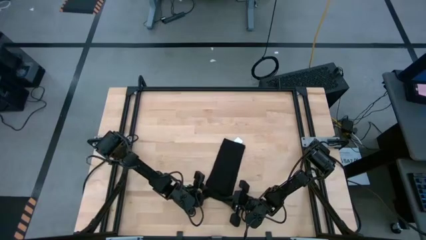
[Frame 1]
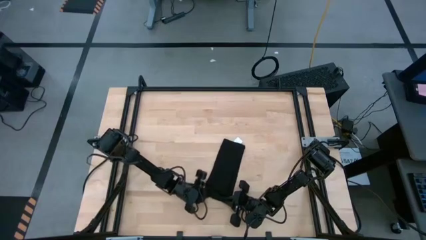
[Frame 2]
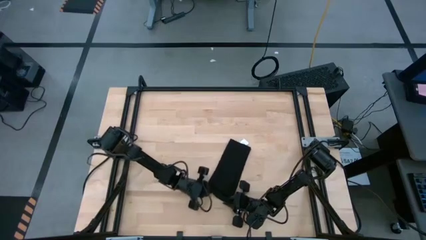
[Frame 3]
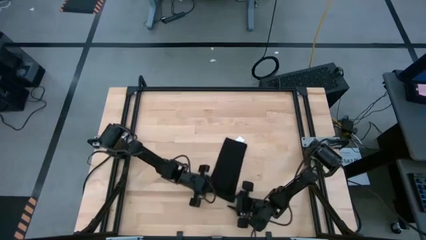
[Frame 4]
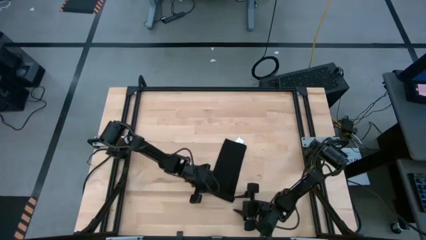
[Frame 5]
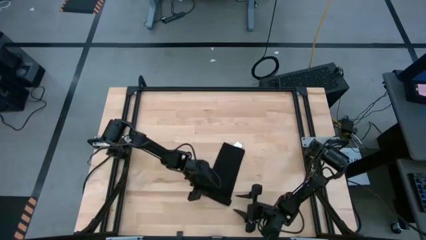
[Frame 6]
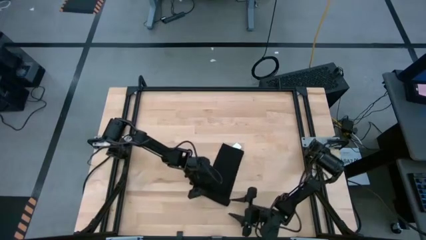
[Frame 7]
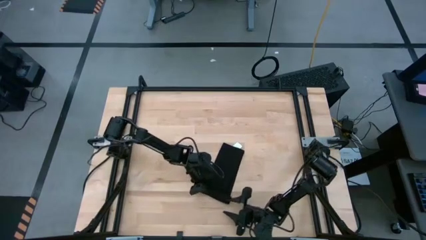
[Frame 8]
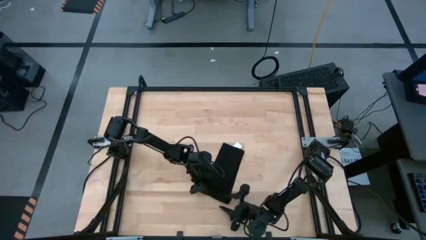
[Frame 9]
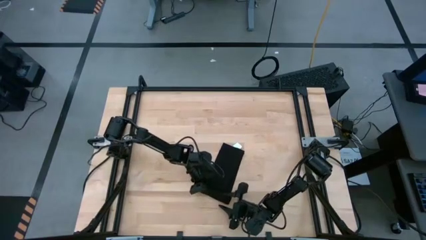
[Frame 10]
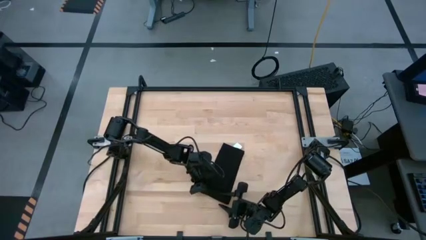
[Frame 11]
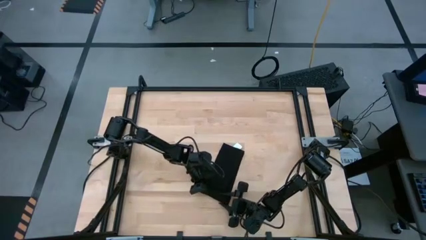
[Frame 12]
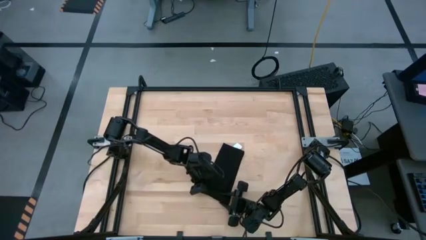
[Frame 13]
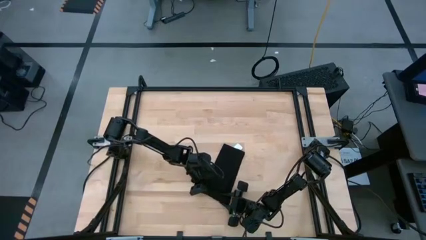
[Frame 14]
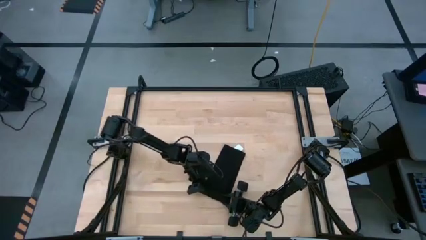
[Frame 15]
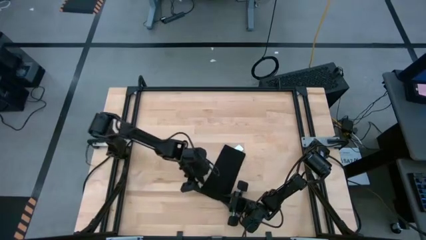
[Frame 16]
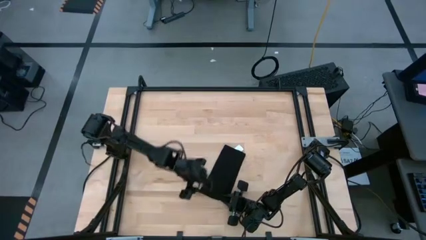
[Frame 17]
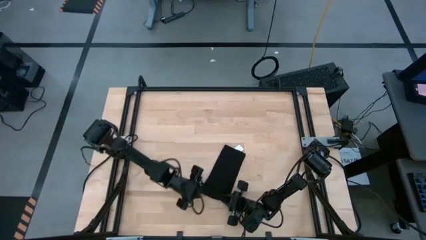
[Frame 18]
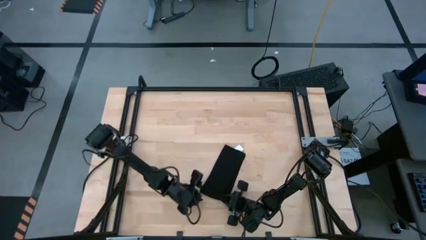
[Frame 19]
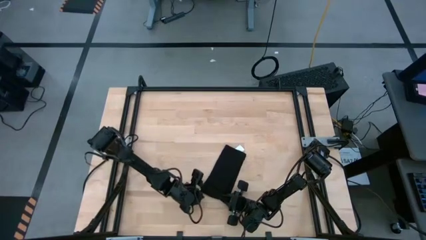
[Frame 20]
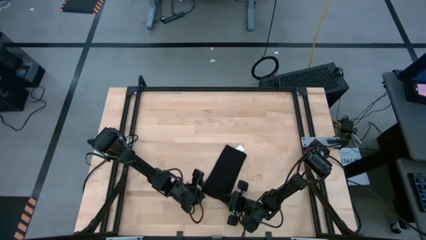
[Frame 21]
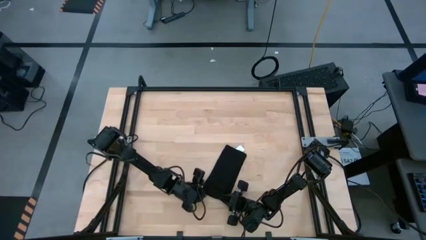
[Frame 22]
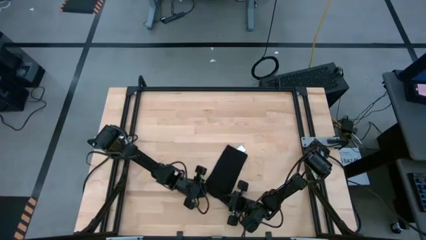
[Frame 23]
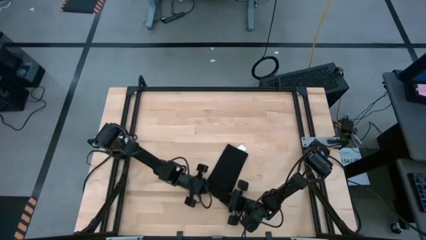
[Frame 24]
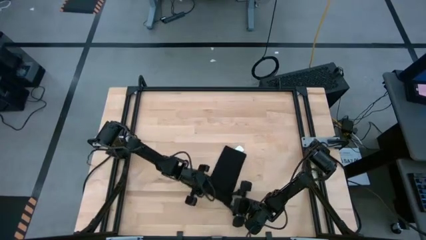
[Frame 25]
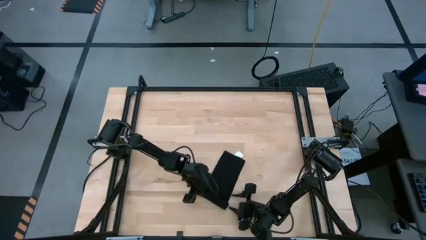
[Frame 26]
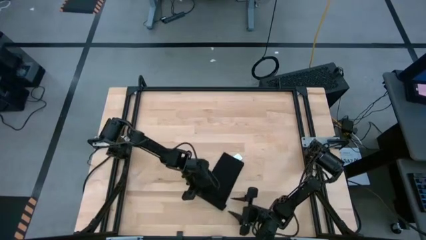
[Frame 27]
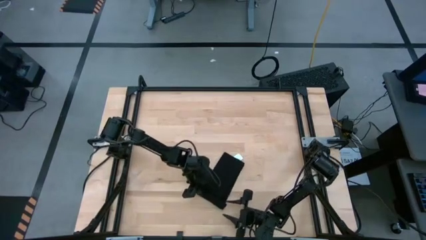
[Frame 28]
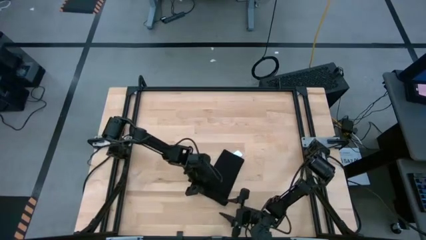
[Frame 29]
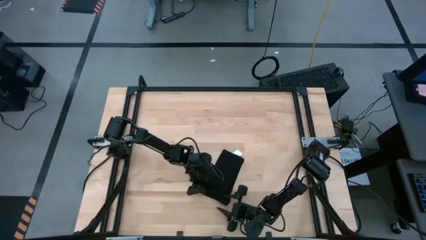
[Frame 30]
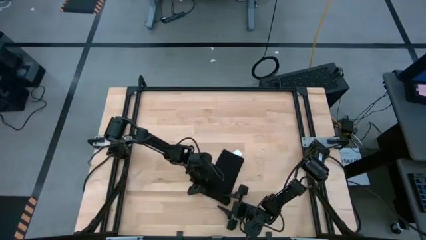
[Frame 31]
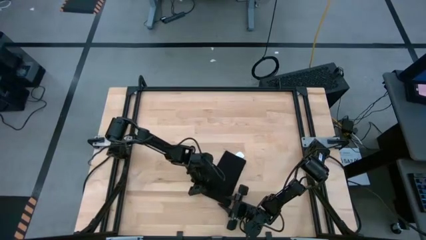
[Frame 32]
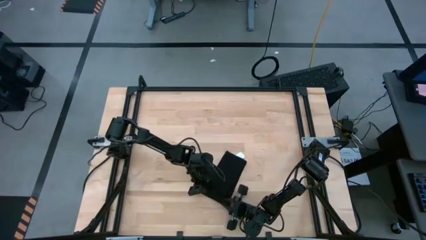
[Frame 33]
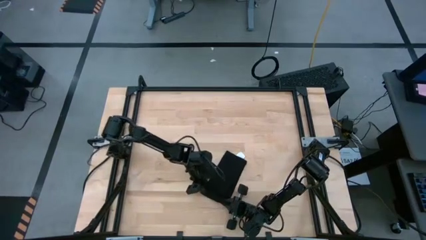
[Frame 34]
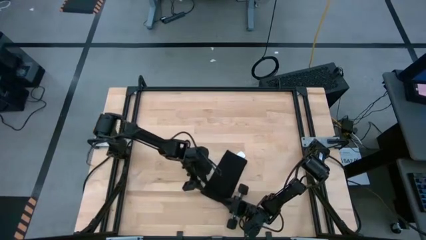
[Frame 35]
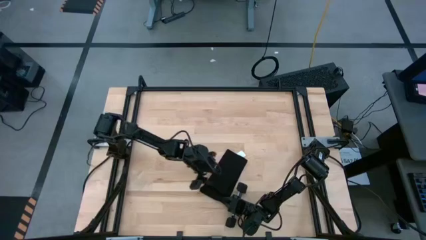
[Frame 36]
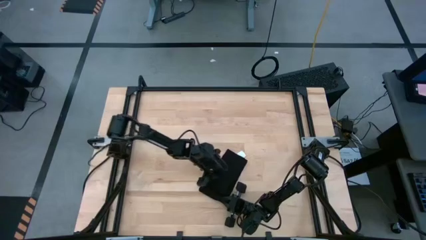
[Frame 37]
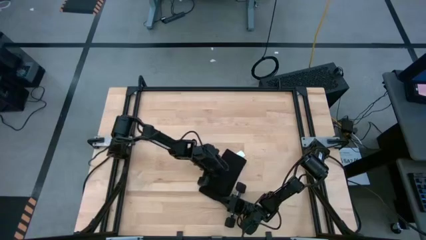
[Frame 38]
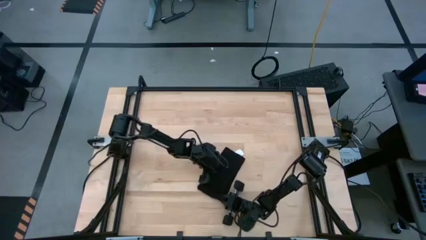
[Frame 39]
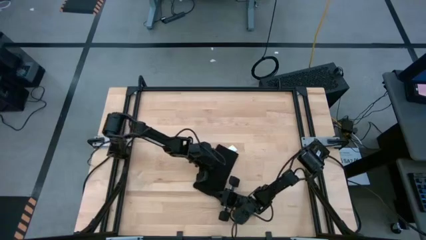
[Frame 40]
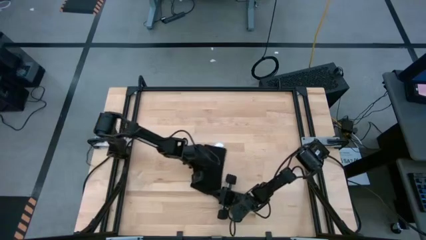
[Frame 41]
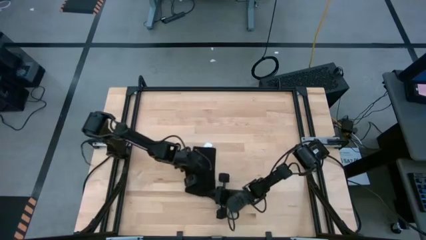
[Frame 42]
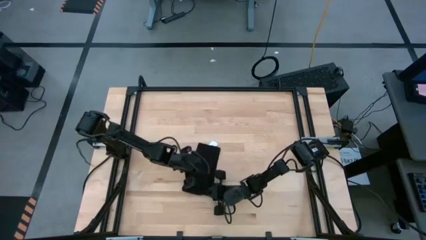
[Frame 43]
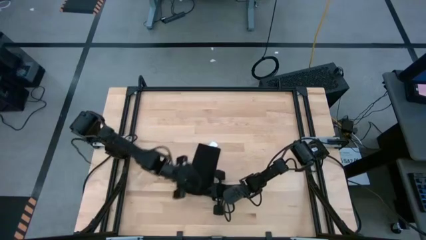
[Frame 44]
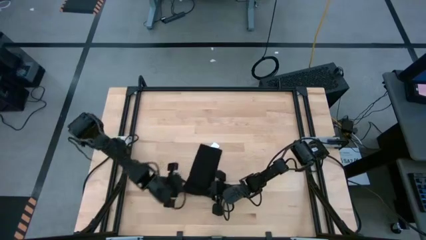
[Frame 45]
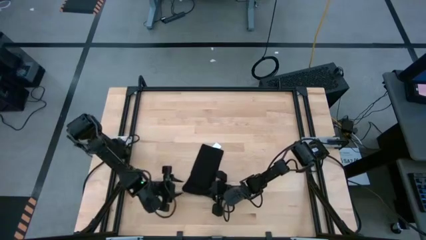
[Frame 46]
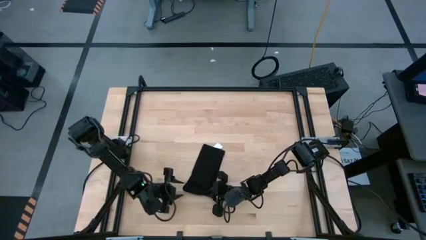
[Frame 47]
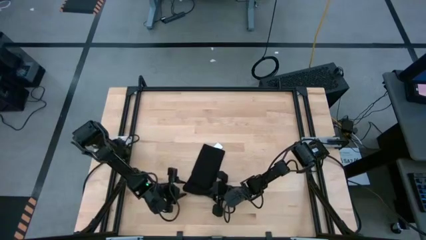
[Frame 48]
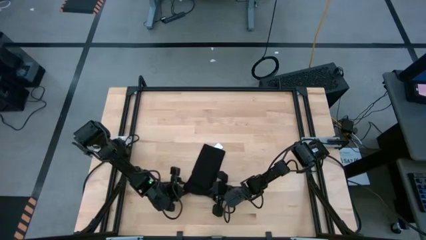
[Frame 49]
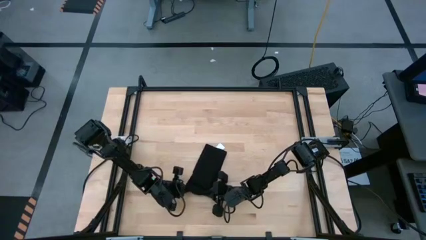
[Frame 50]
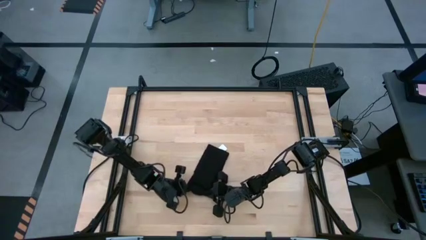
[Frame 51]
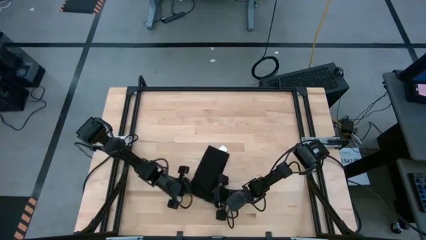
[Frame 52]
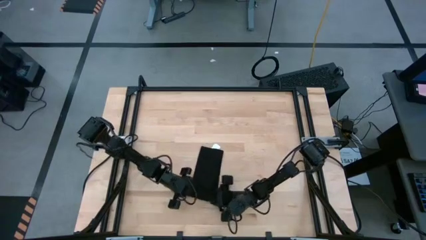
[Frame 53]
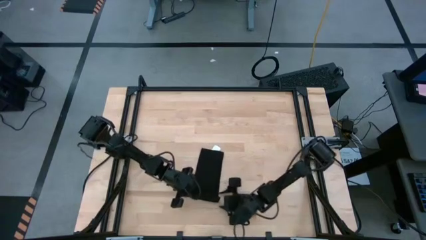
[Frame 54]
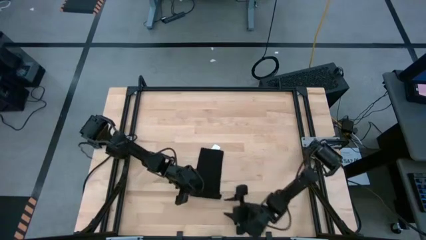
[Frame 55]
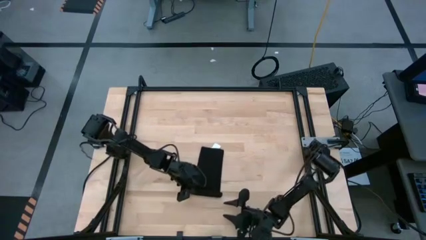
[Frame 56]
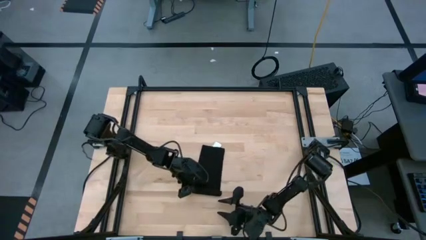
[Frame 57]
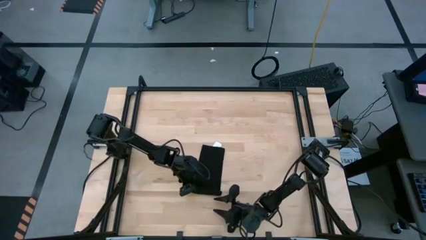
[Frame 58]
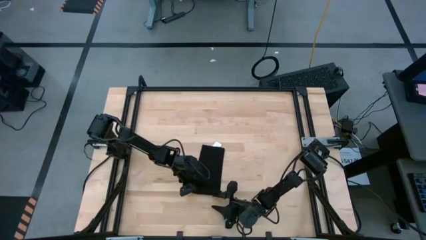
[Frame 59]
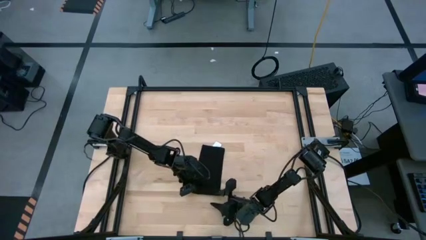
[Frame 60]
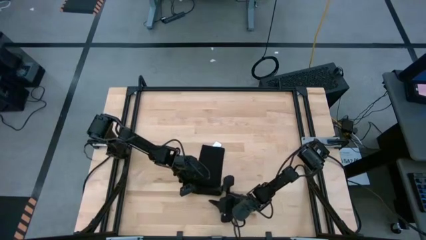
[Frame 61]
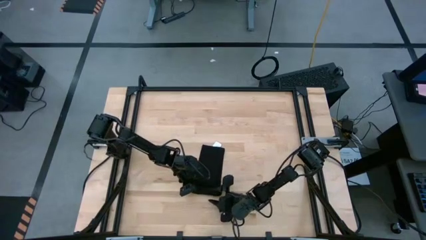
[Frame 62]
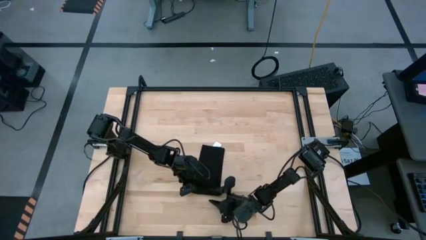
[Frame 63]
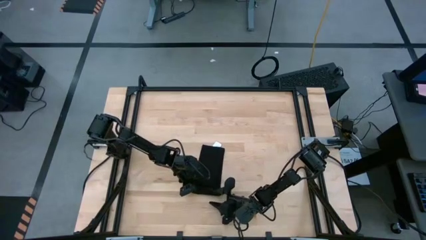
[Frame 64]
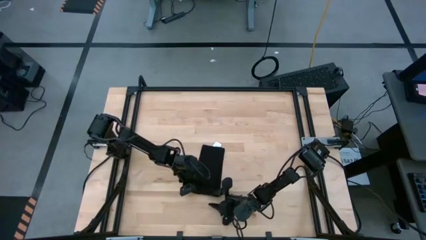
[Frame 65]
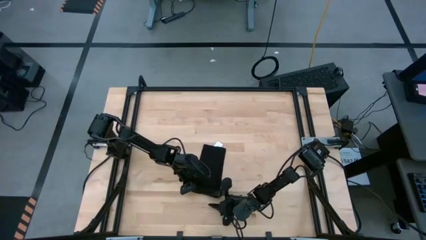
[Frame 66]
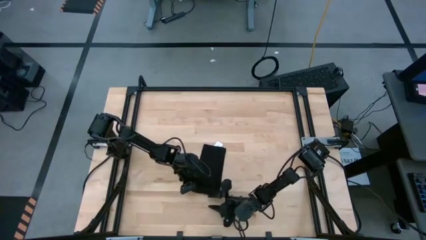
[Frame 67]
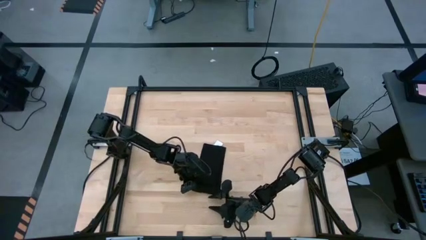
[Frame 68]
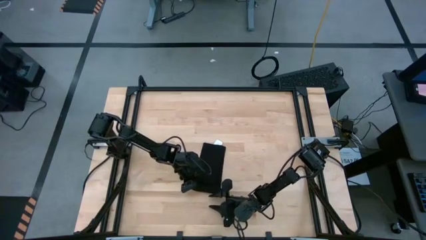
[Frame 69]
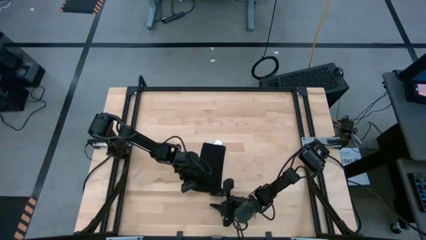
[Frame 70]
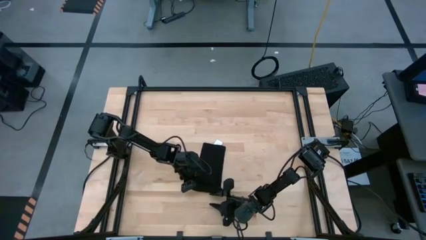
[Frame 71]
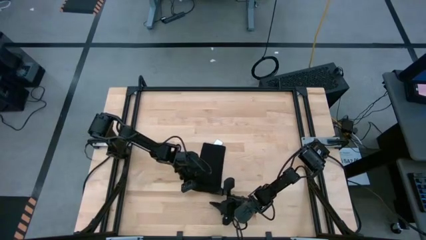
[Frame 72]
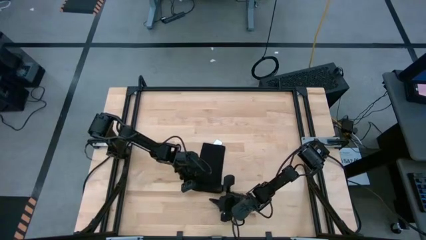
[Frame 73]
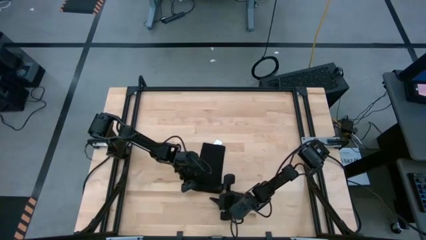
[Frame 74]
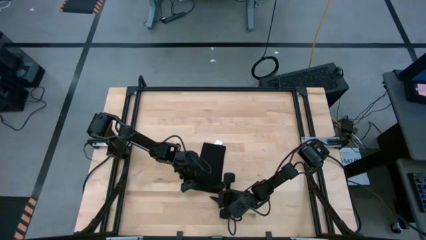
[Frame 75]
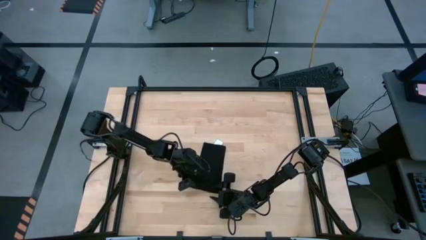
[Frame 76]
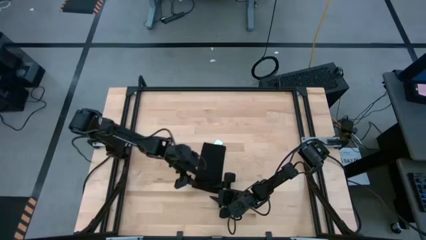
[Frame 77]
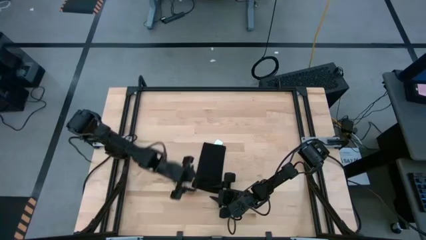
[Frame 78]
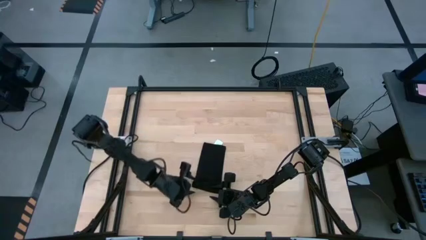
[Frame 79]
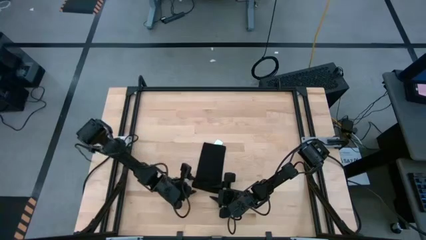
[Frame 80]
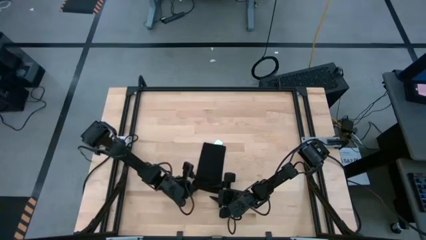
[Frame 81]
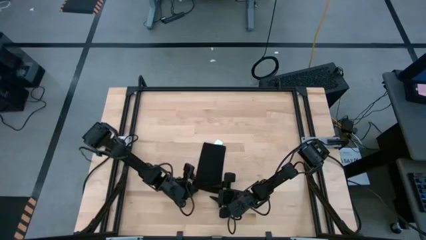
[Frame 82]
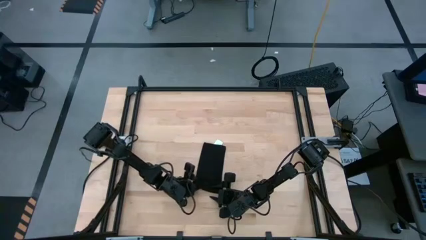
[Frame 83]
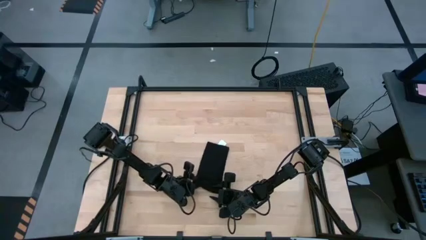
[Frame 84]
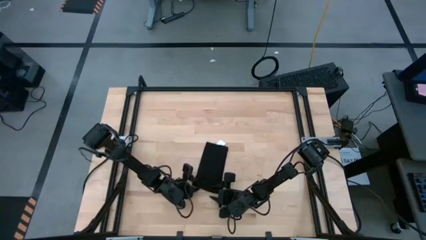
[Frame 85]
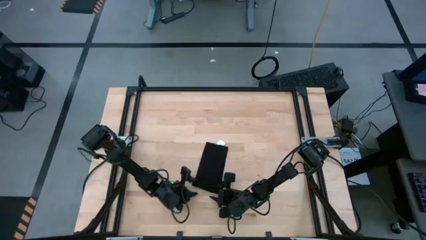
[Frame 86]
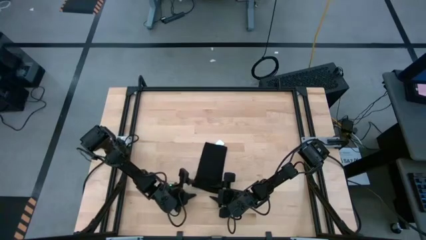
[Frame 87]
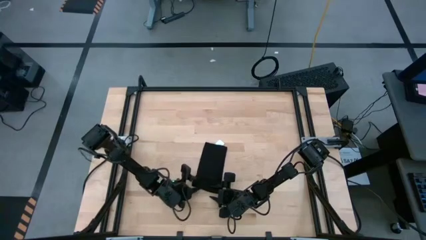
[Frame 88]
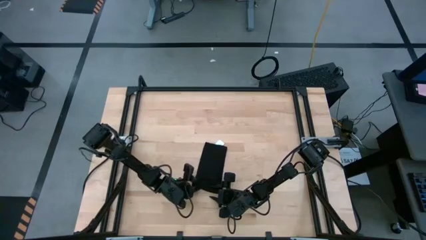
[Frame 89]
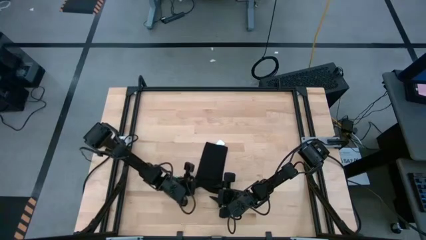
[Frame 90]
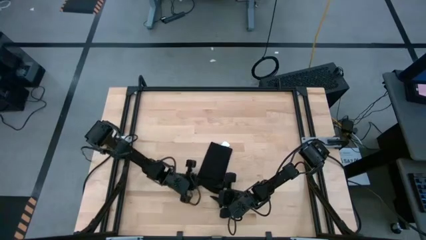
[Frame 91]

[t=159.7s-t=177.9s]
Task: Roll napkin
Roll the black napkin
